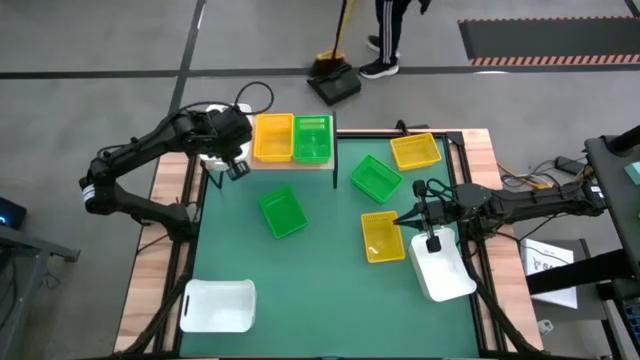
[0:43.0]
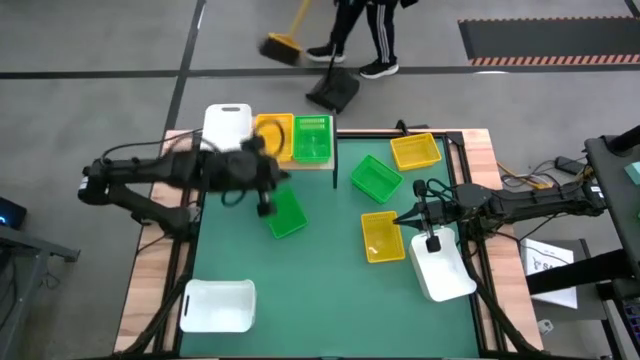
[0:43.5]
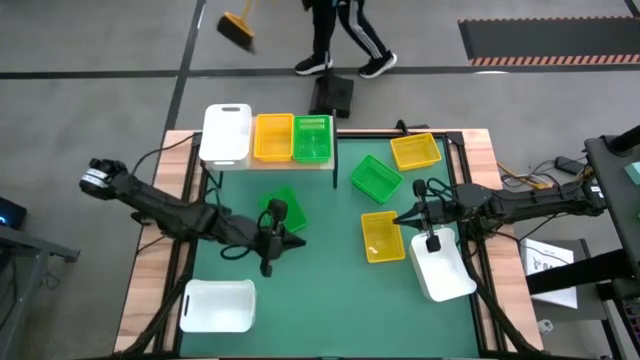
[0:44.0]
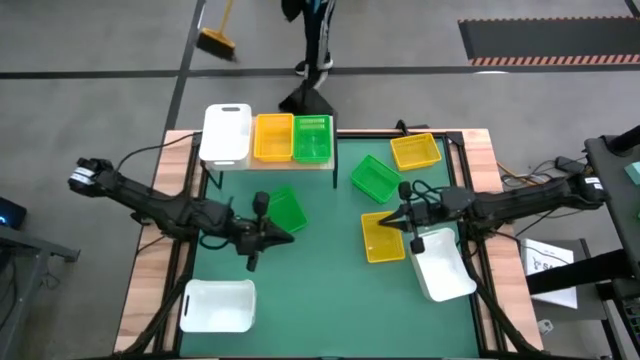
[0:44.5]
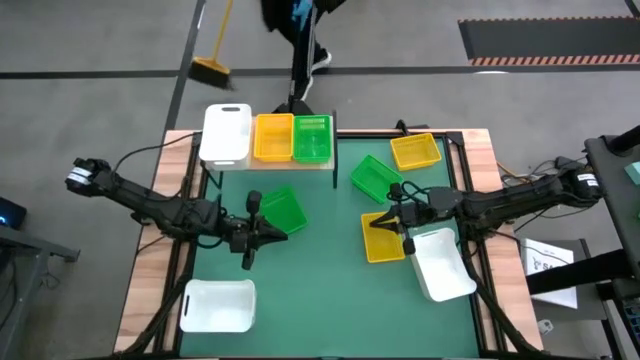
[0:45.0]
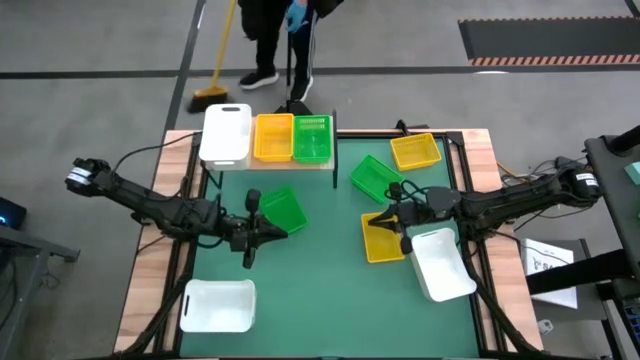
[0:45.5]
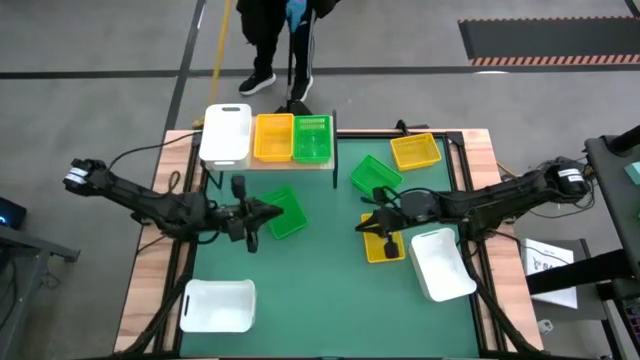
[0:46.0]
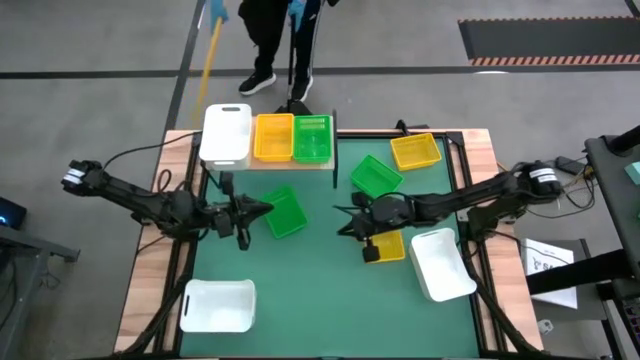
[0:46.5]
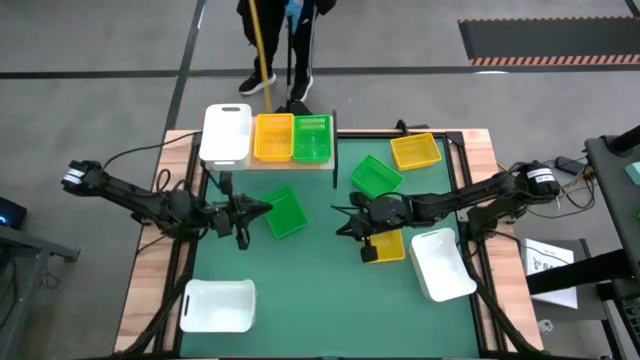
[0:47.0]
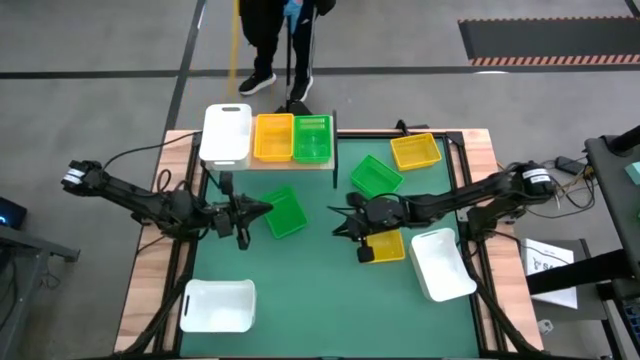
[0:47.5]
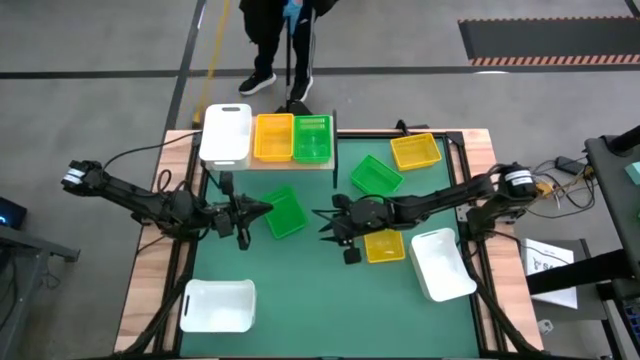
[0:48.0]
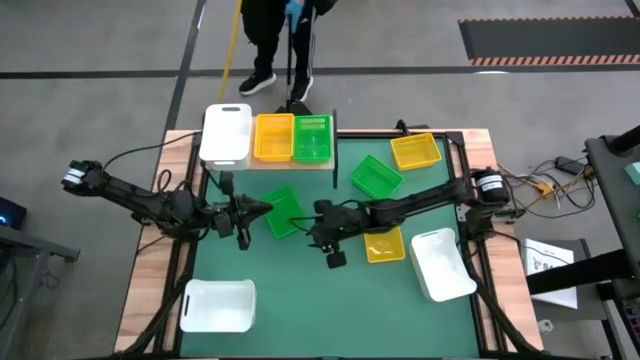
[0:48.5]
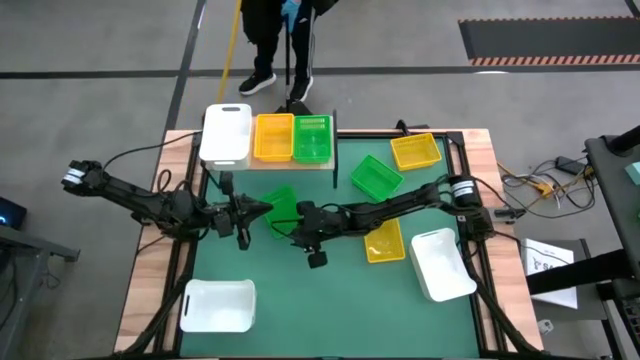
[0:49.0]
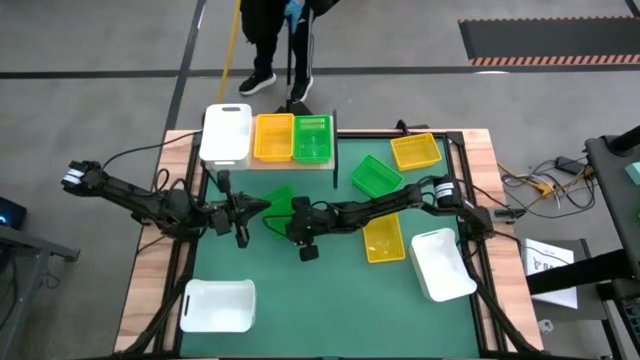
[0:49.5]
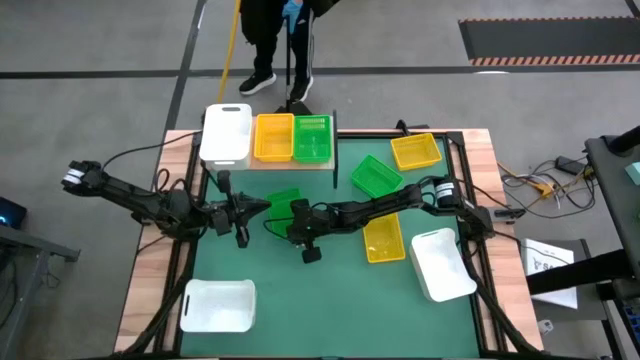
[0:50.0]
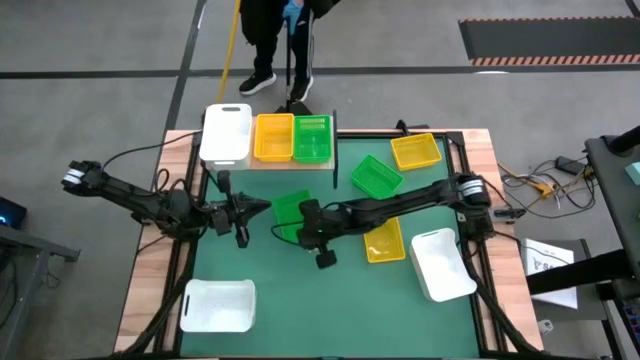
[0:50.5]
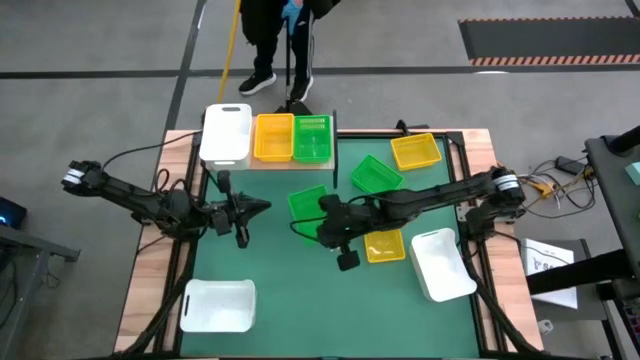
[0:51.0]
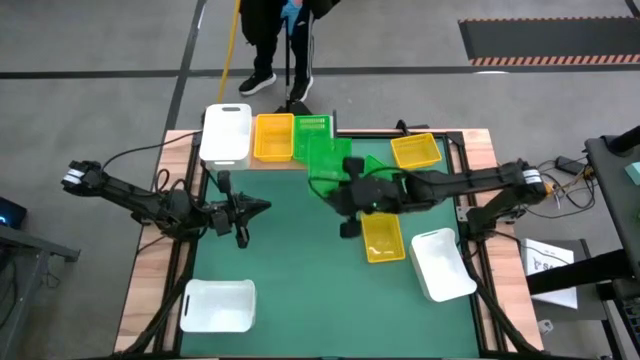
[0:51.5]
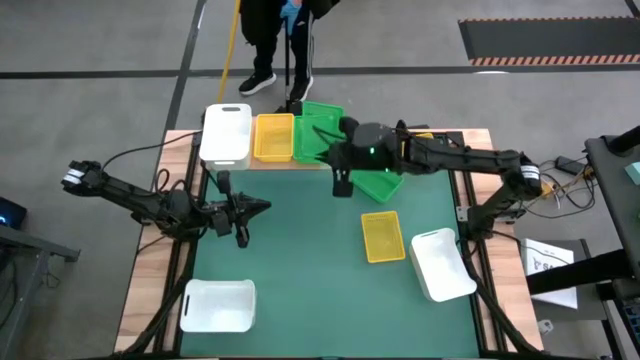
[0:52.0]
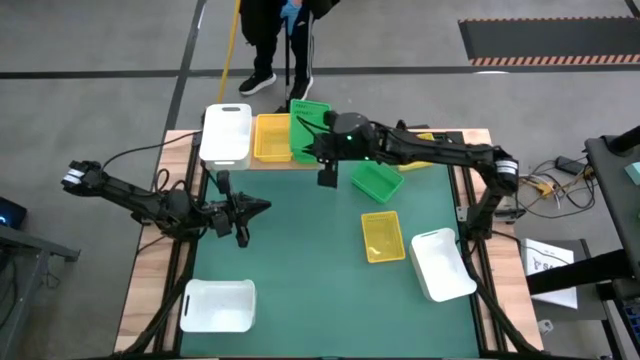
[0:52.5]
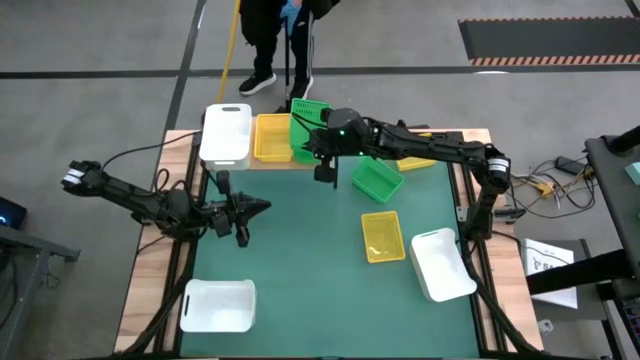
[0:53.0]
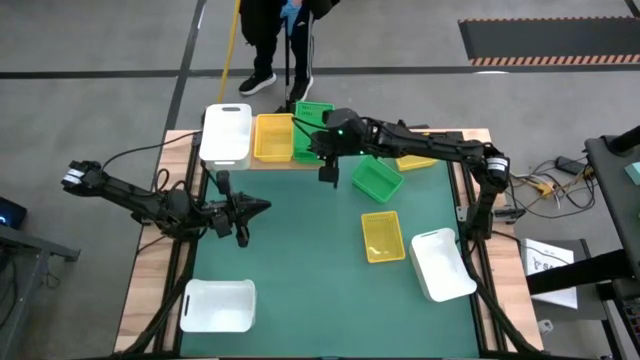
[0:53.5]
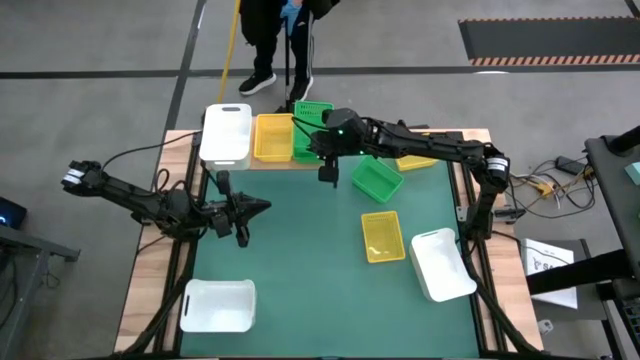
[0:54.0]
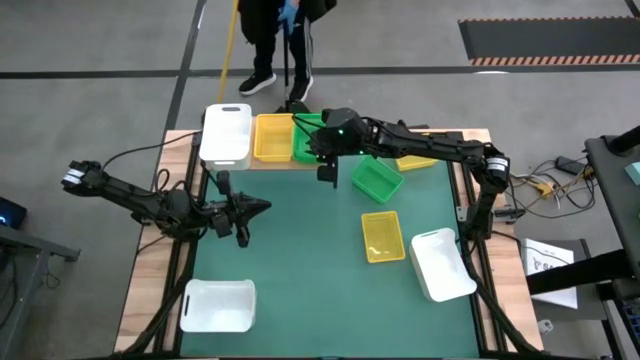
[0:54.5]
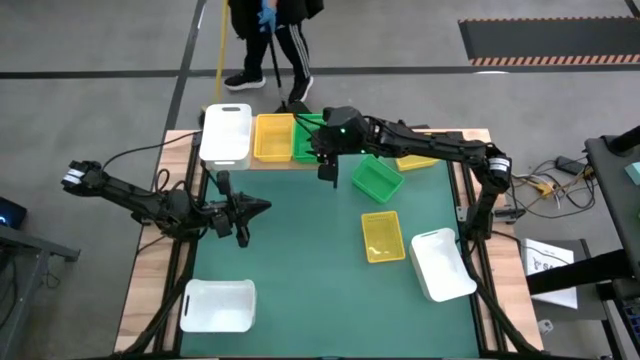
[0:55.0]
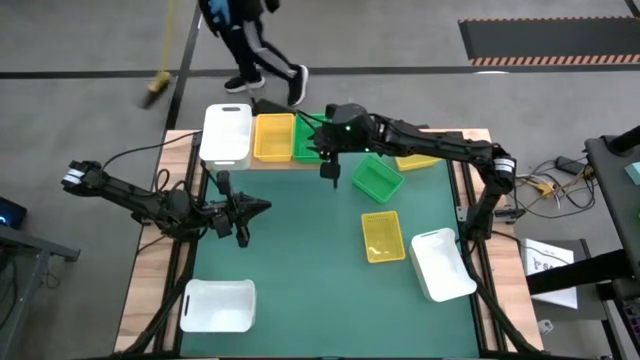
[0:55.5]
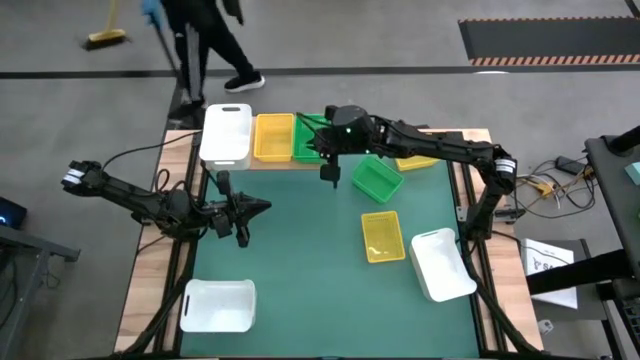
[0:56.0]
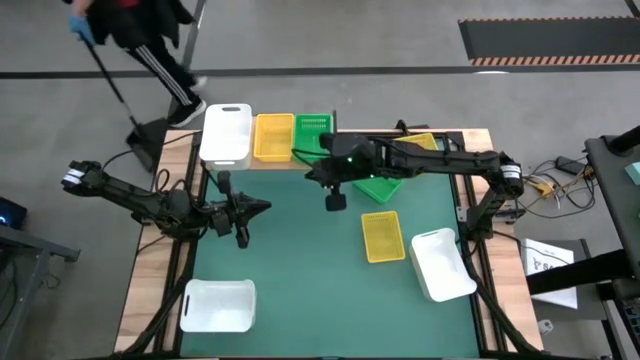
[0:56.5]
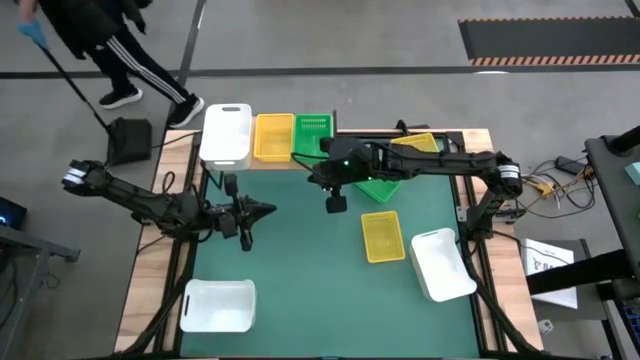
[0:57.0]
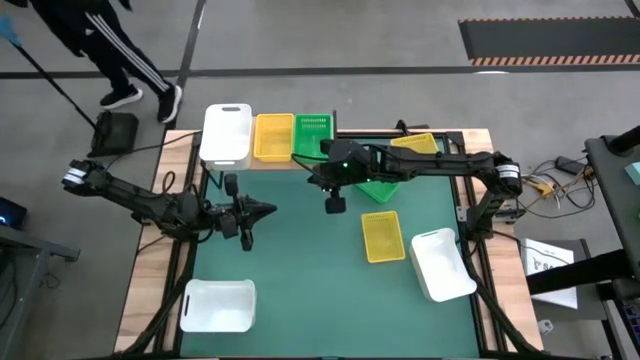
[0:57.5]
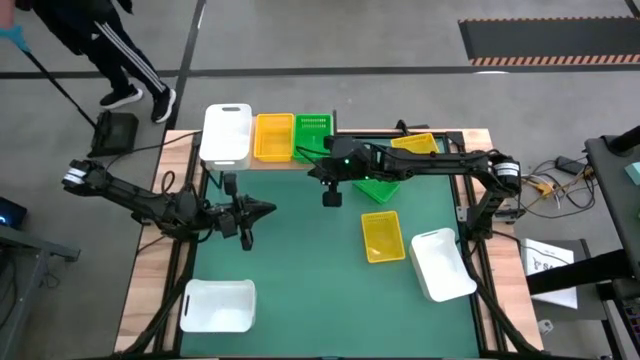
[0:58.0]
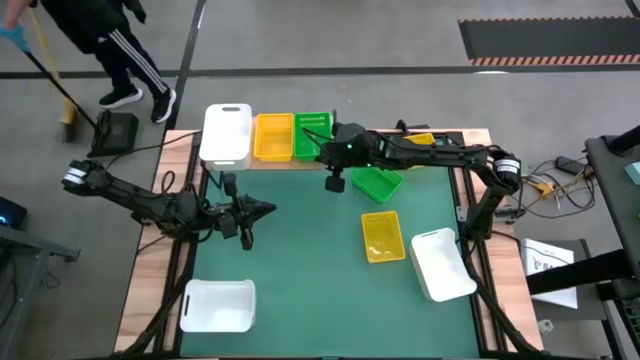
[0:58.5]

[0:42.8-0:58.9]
Stack the left green basket on the green basket on the shelf

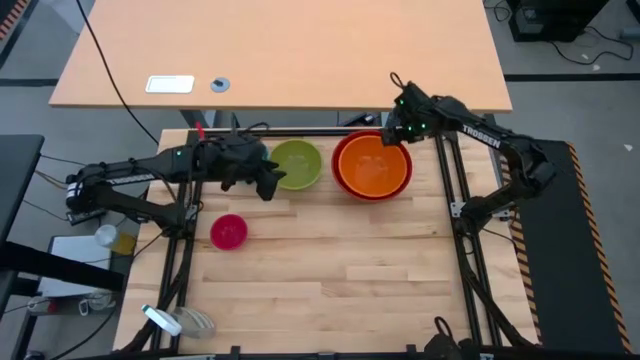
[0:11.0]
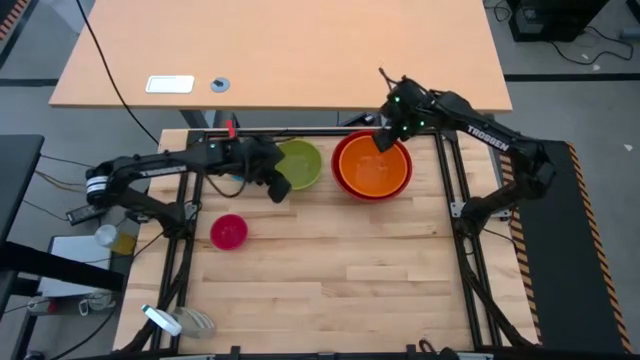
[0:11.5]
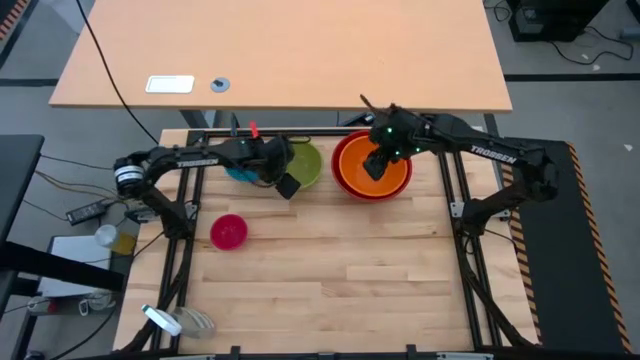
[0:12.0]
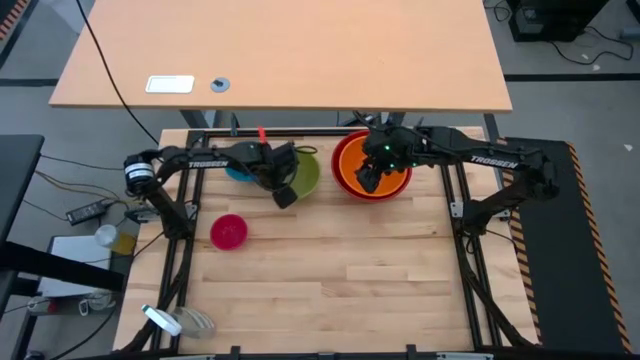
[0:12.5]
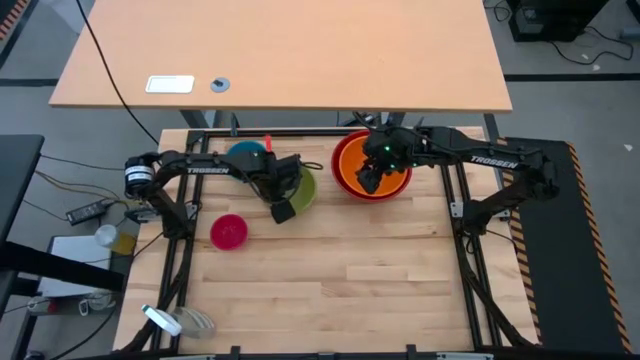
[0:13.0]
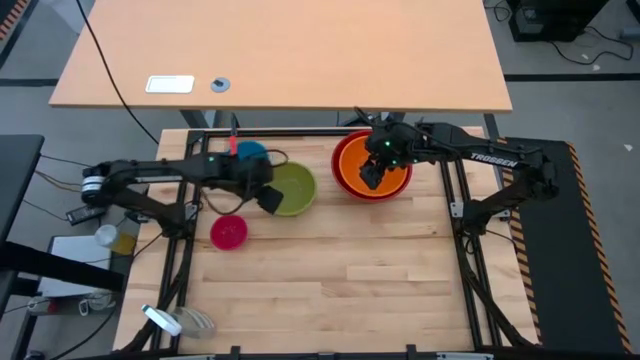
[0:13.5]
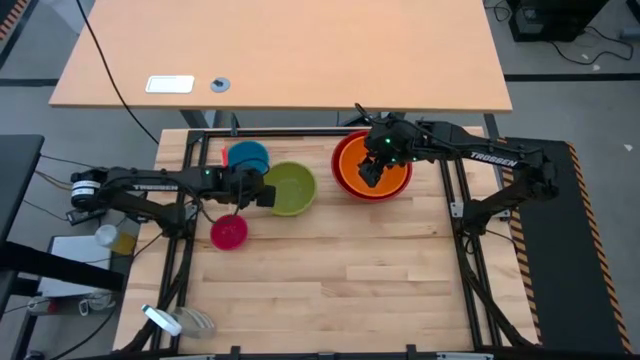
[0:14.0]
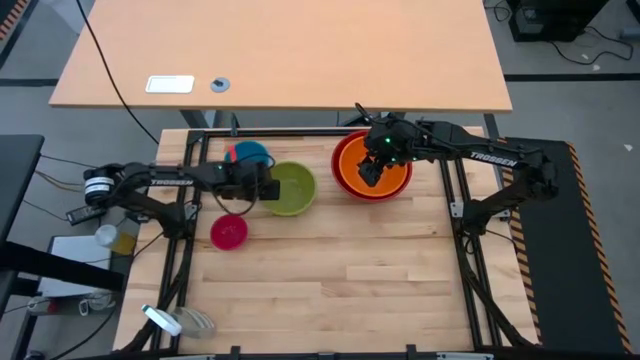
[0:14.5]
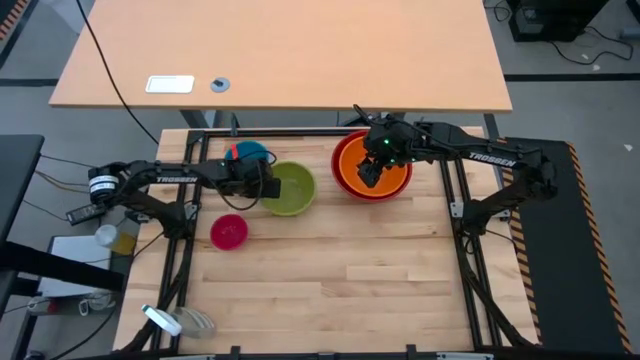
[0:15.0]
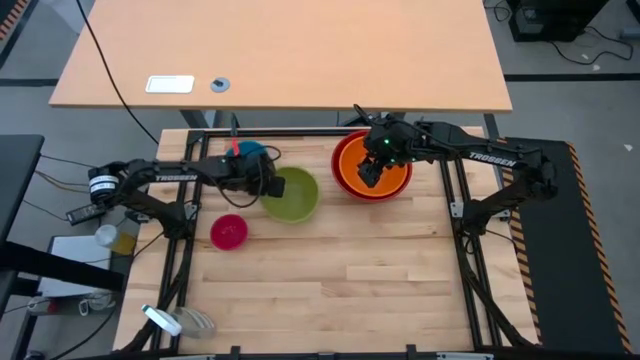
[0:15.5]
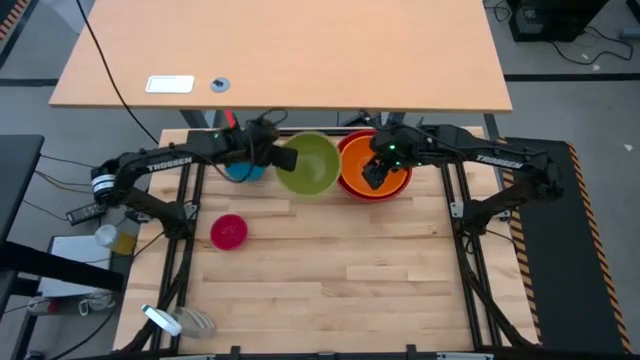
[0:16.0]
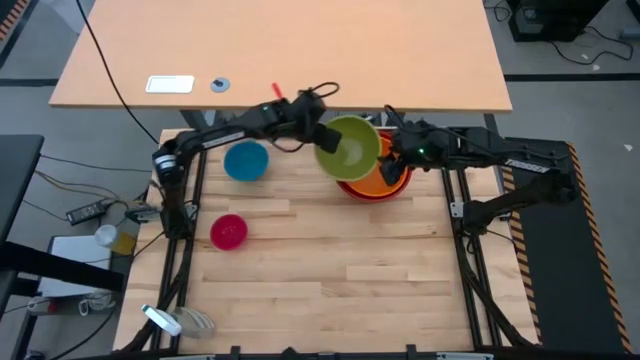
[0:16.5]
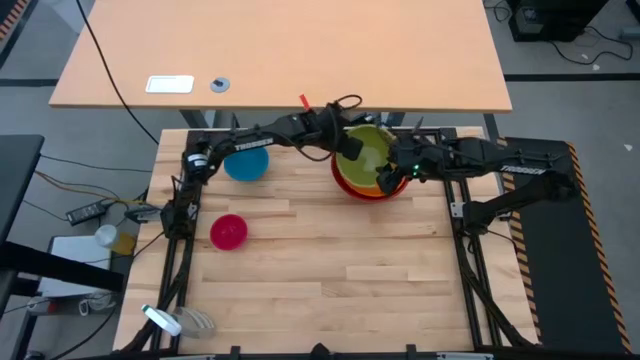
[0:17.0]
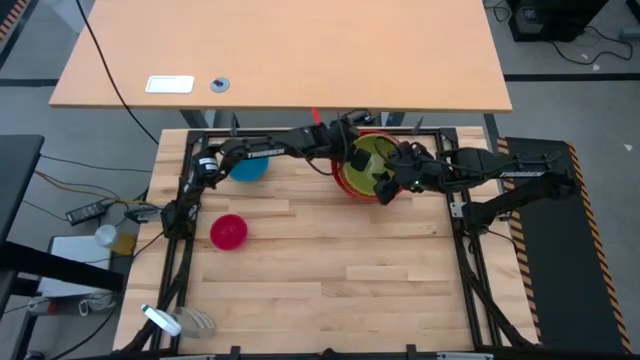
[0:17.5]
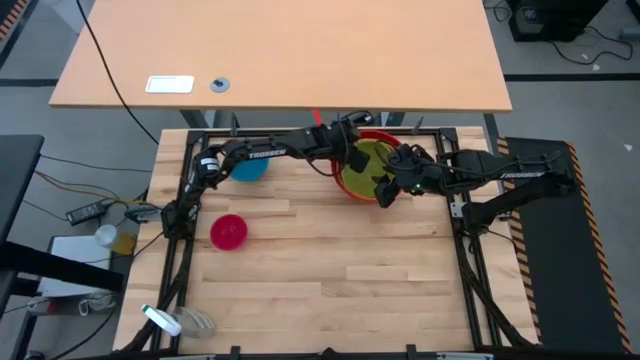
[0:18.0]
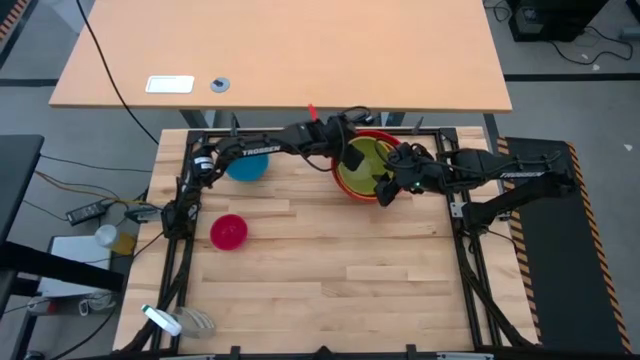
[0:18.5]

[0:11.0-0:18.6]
Stack the green bowl on top of the orange bowl
